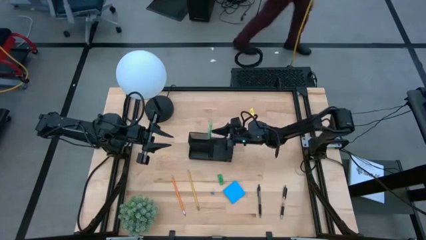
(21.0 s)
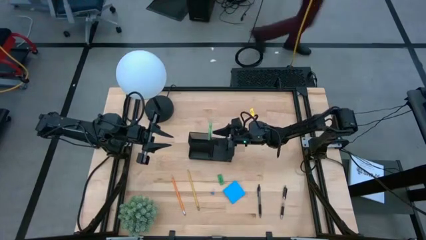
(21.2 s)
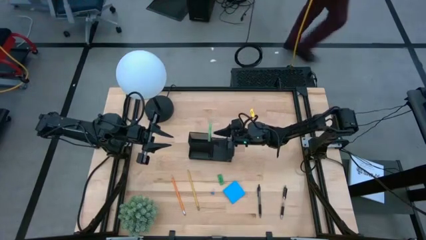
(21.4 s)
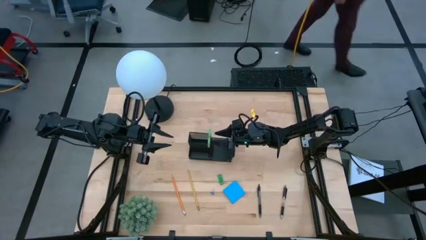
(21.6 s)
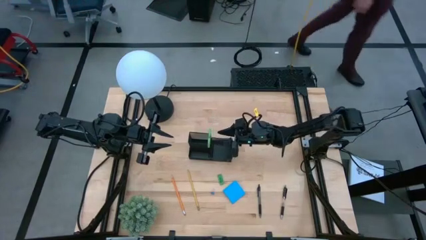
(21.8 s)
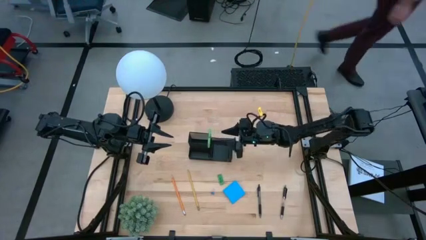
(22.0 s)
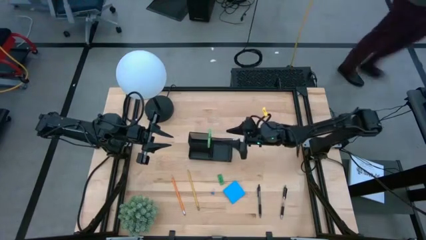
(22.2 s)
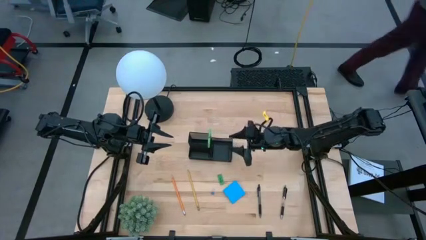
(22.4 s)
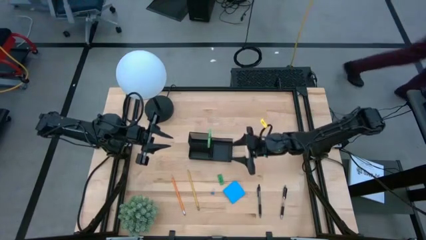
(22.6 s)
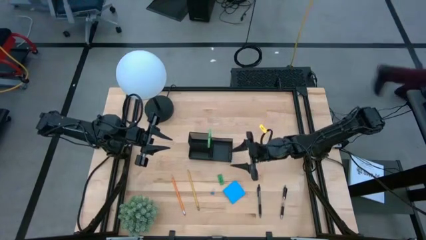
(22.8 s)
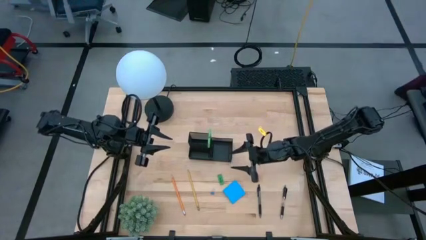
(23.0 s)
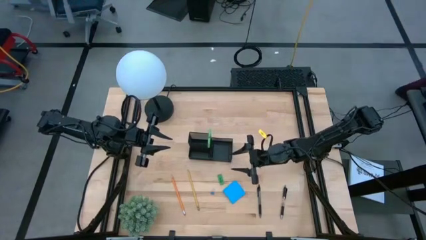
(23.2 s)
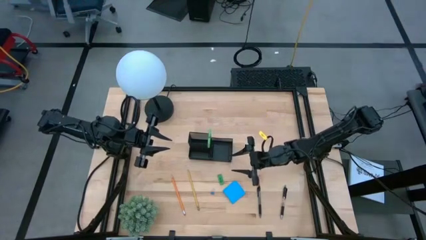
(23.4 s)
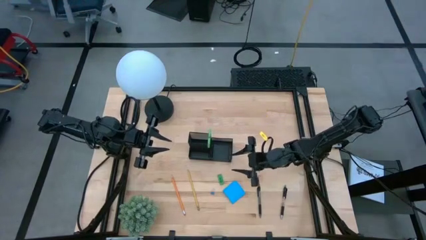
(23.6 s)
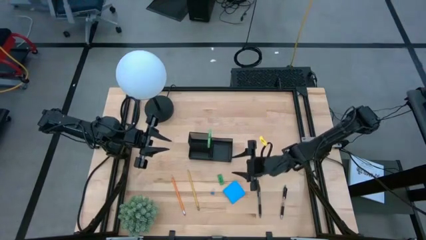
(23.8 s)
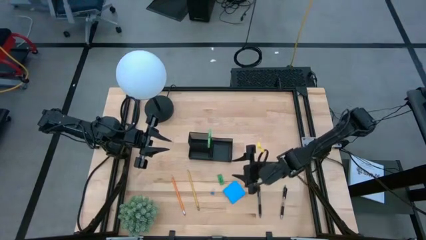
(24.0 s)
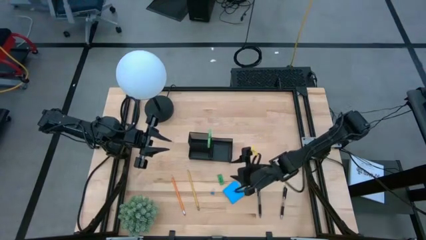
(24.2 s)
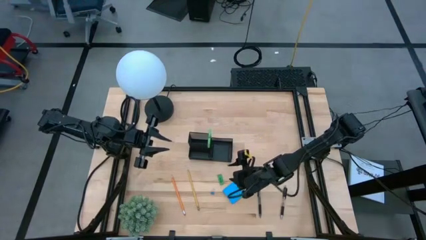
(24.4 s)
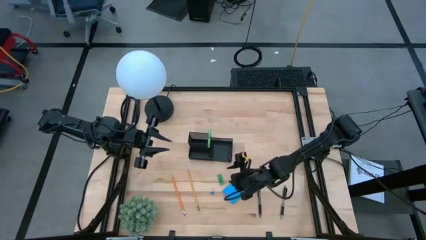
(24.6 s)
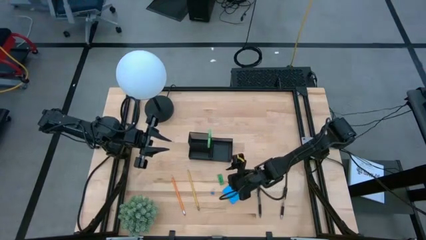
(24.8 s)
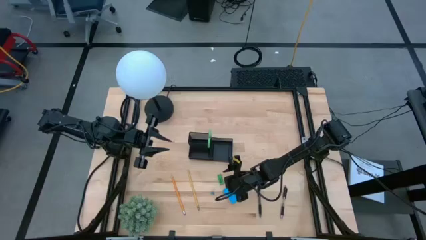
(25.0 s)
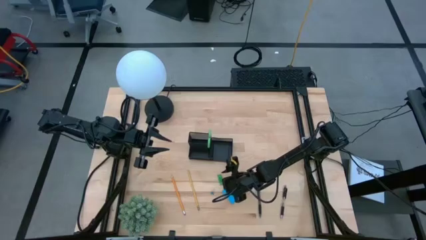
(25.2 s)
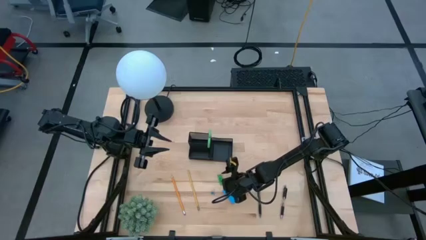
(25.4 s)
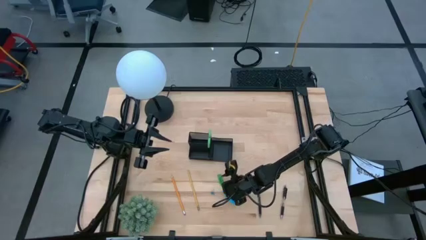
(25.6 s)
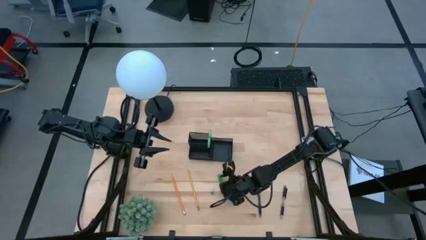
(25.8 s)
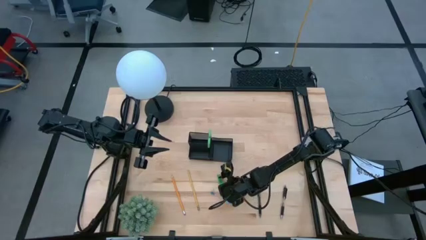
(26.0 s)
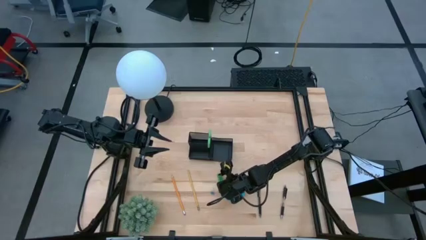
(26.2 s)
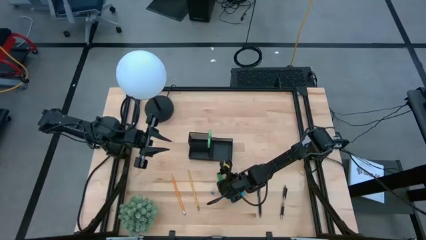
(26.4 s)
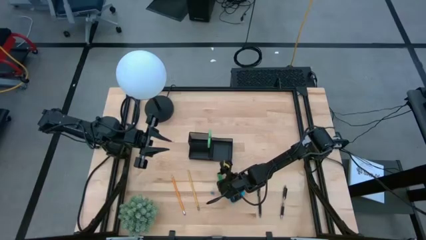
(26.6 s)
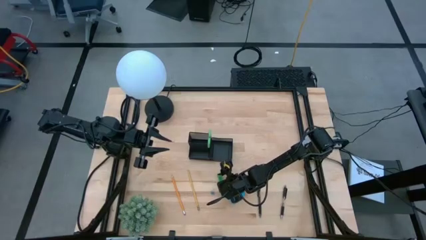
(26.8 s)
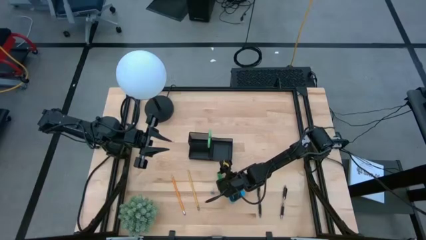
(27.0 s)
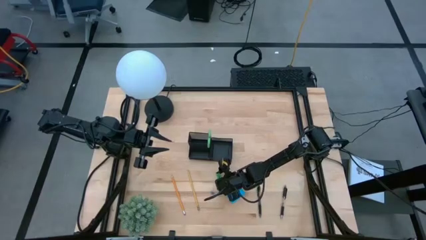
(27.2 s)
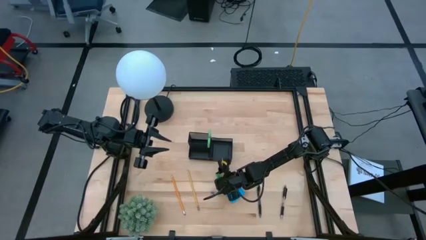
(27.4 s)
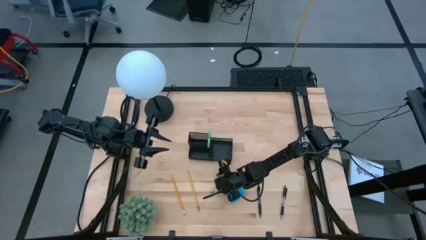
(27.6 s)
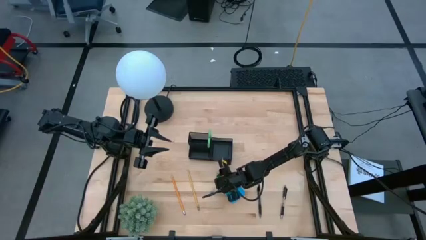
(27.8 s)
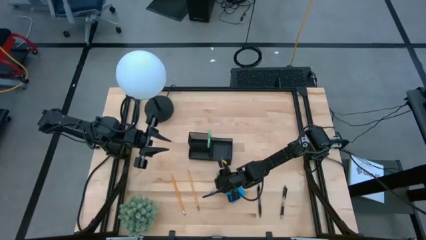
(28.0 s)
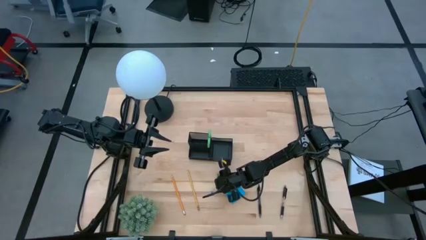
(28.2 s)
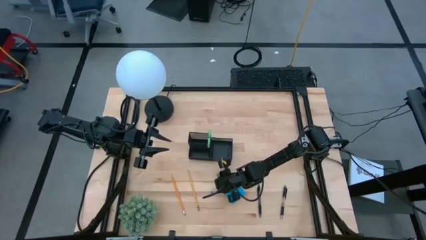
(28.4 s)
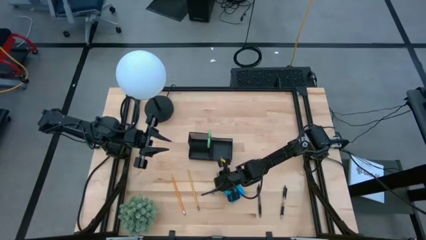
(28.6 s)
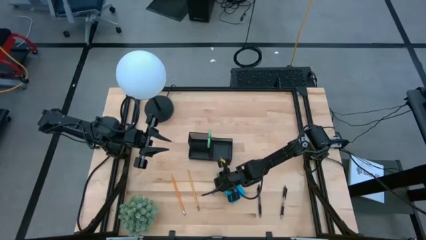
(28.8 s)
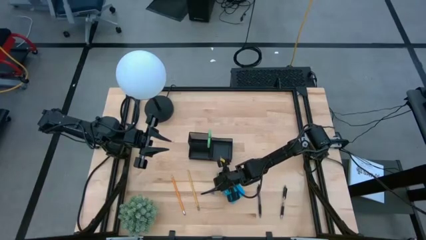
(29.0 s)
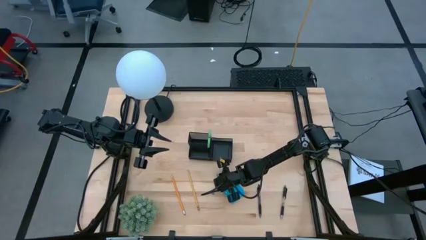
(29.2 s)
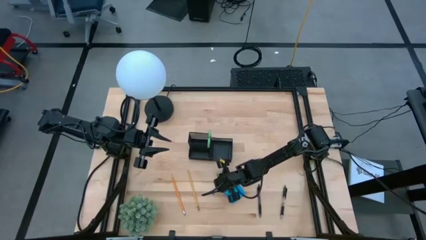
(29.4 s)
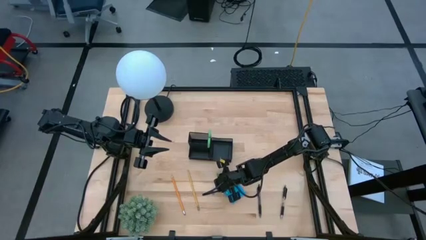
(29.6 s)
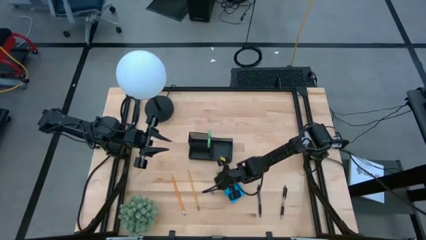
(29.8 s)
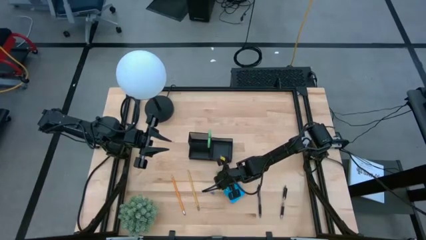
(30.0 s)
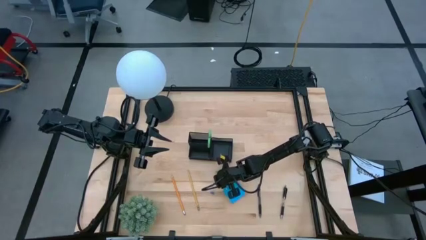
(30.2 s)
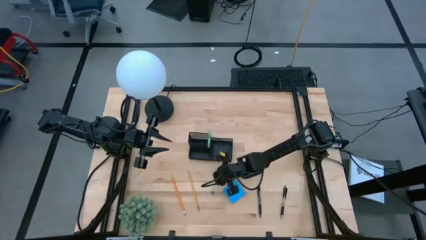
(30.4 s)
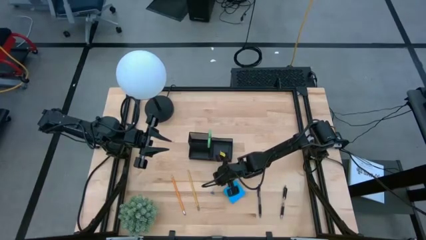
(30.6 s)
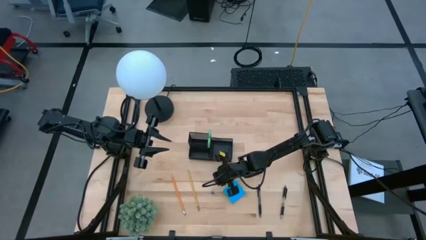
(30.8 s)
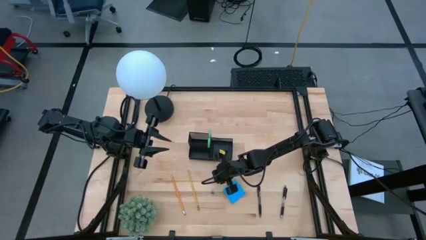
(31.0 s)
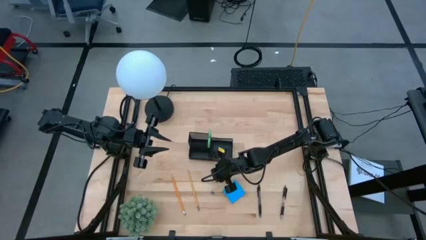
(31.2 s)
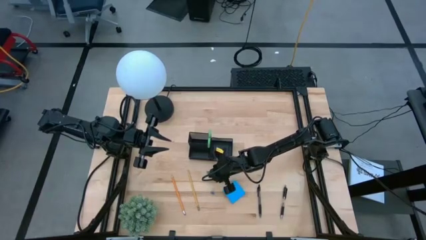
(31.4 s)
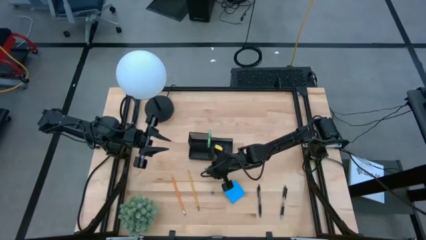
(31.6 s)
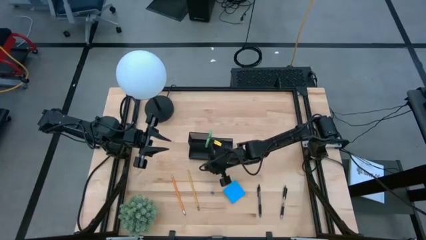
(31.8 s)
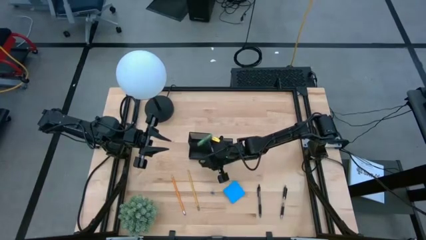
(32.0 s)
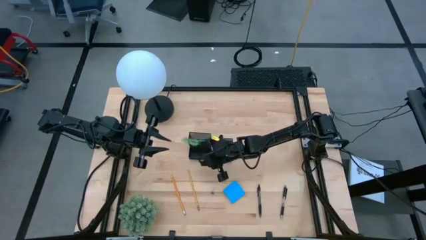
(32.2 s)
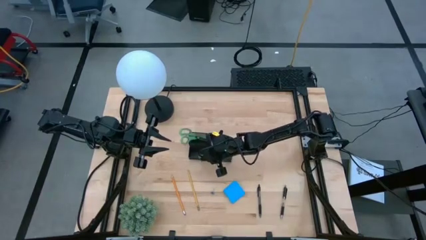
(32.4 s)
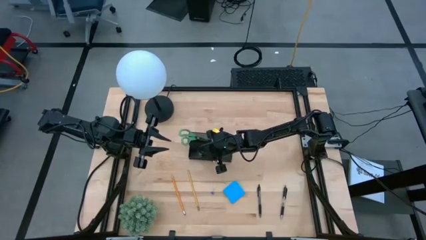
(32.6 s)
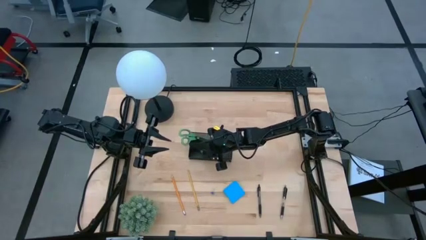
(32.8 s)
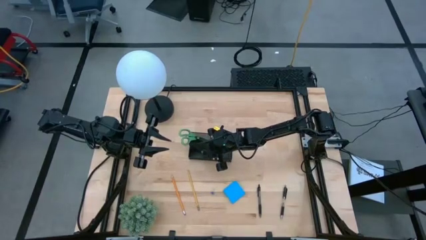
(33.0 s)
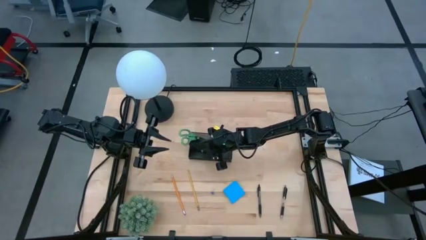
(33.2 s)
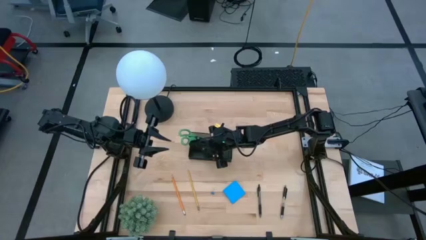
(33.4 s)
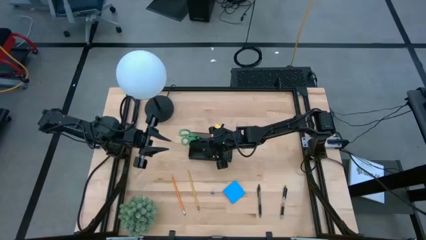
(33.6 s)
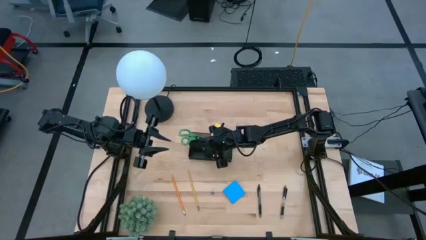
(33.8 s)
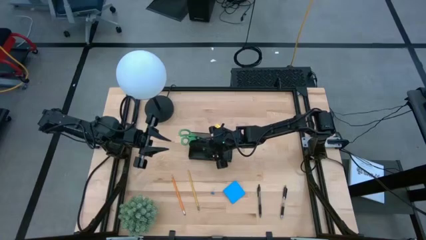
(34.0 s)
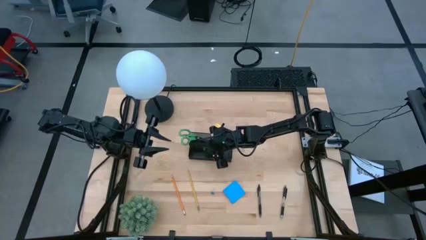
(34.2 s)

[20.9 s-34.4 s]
Task: Pick and place office supplies into organizer
Put the green eraser into the black desk organizer
